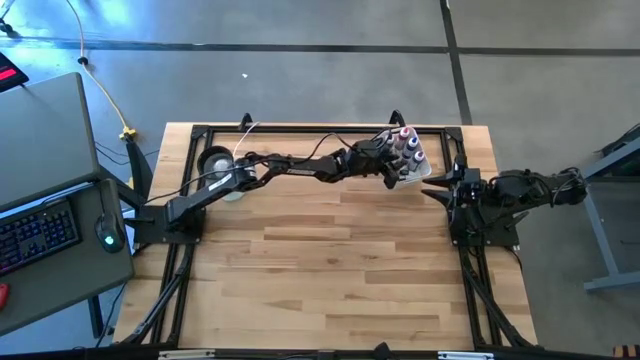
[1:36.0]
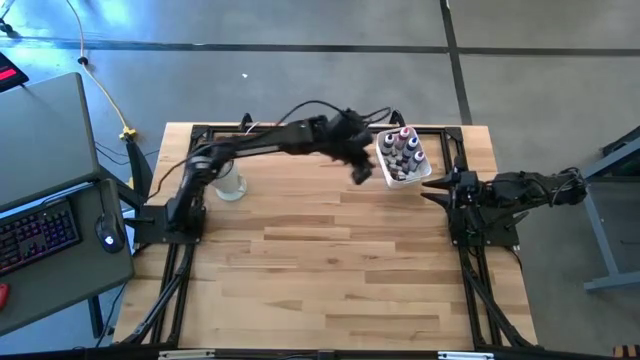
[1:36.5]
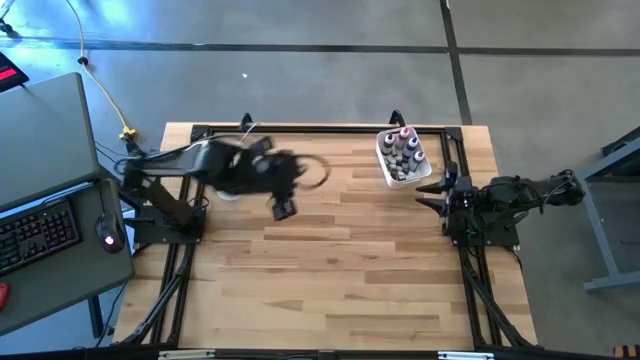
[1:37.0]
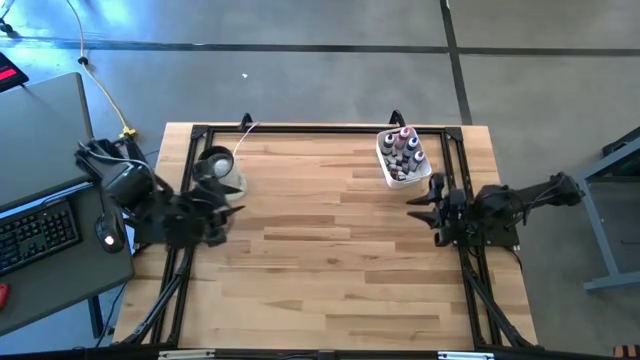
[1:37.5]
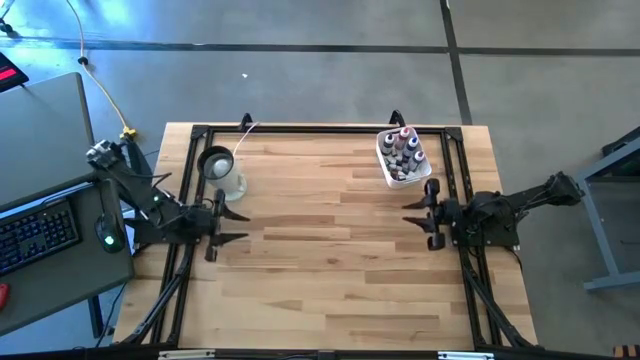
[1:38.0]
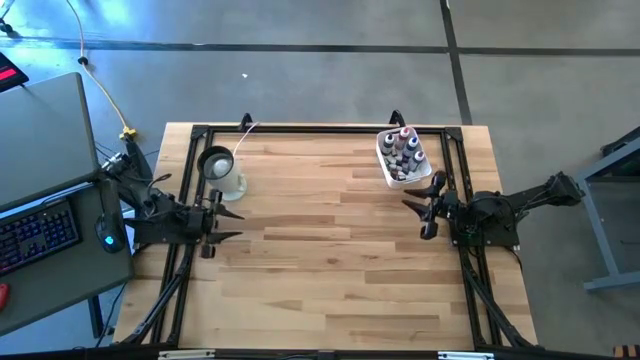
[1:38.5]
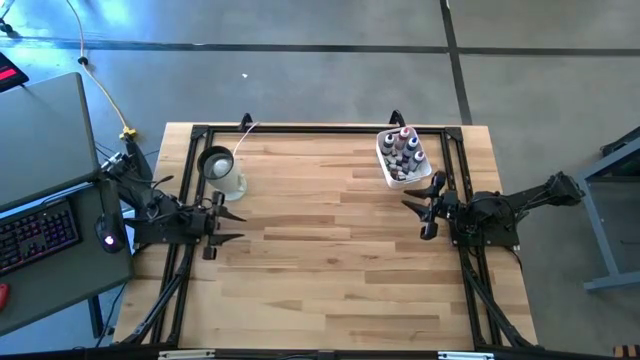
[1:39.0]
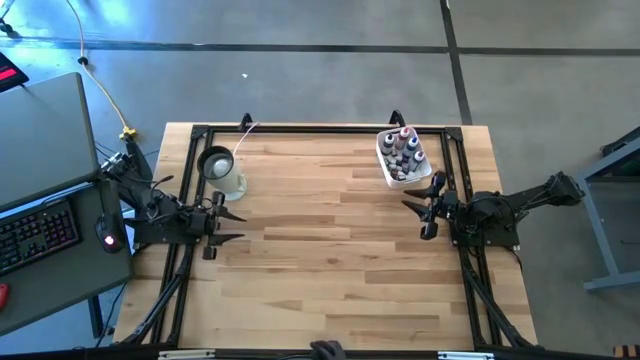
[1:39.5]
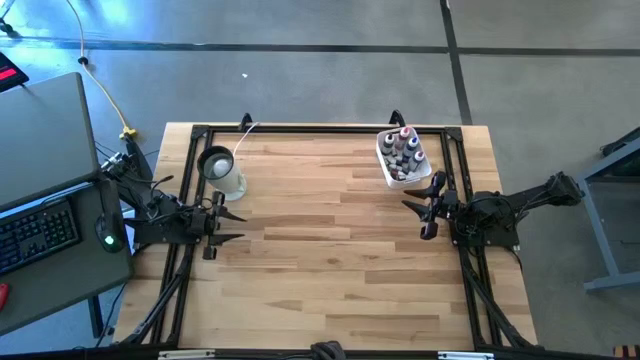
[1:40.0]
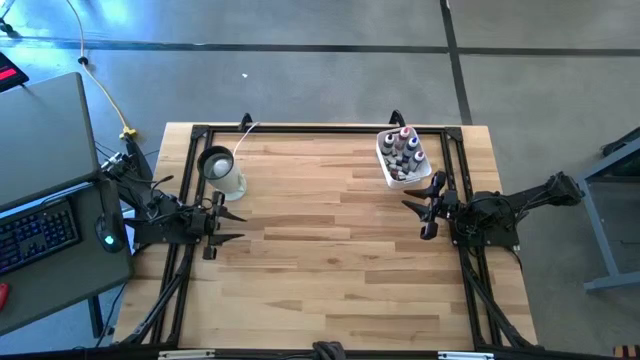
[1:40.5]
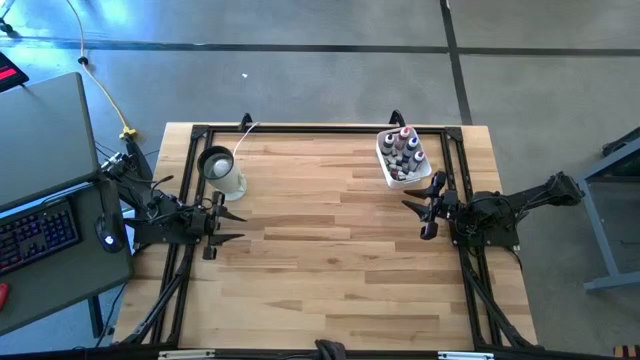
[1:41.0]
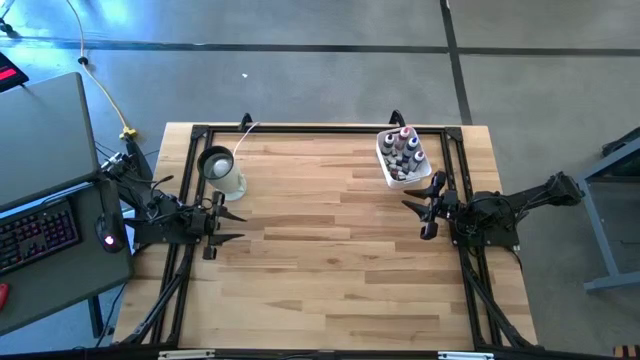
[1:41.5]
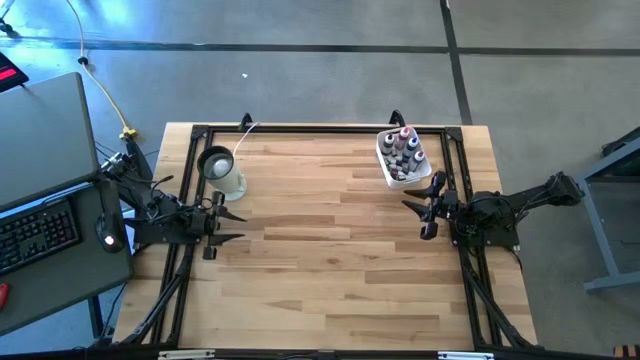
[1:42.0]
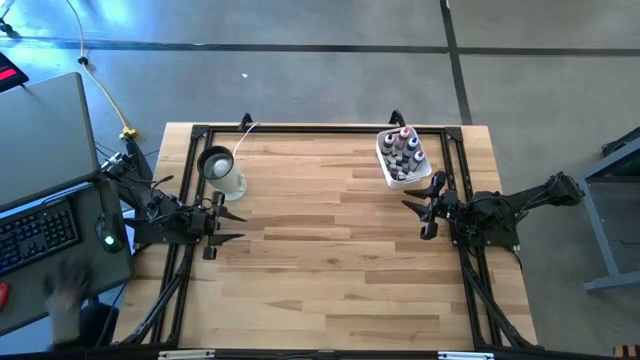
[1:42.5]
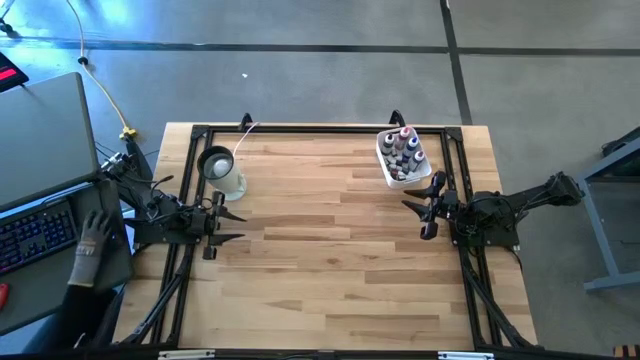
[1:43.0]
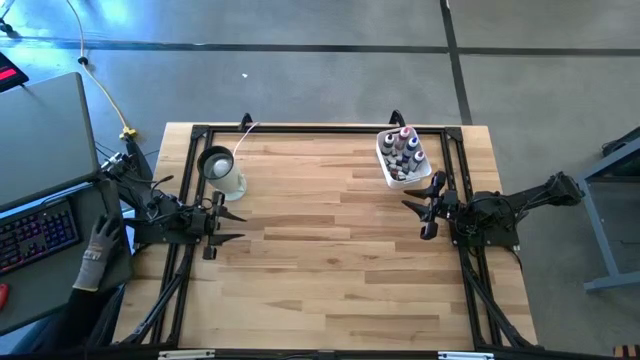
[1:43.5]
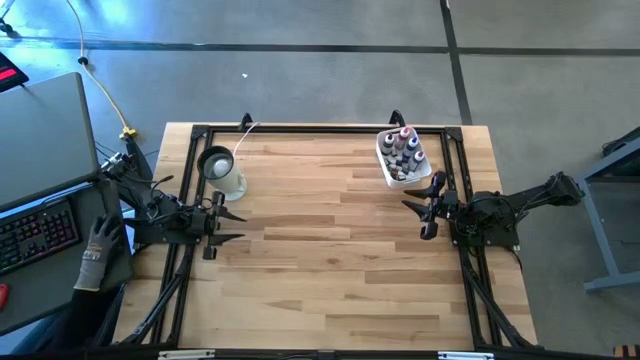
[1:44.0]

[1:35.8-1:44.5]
Task: Pick & Place food coloring
Return to Home Position

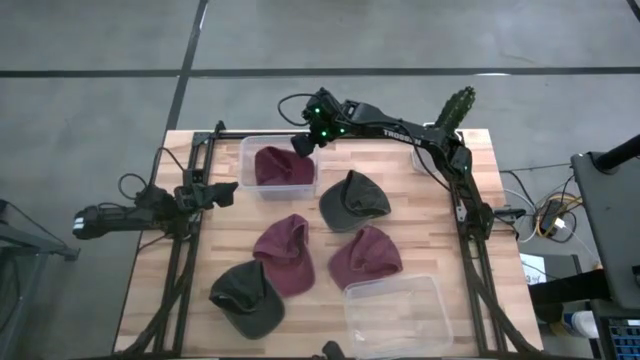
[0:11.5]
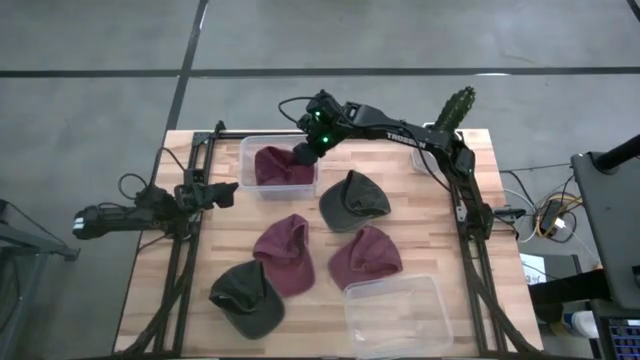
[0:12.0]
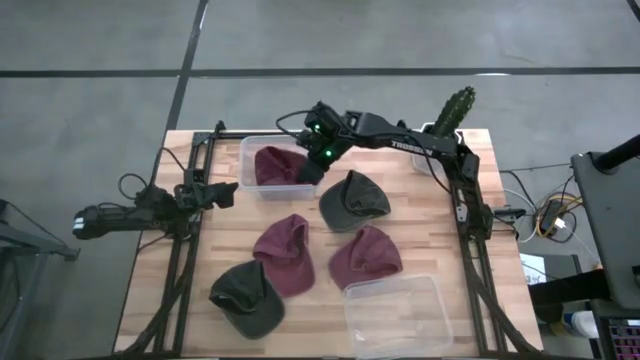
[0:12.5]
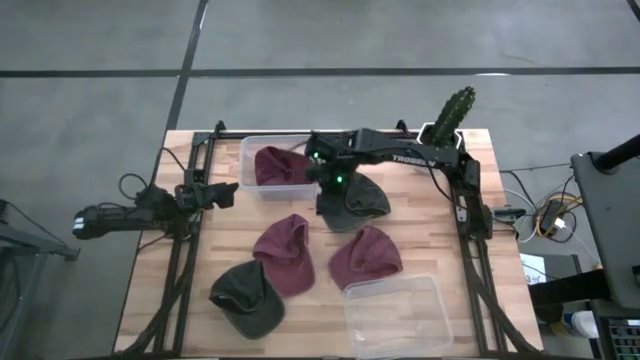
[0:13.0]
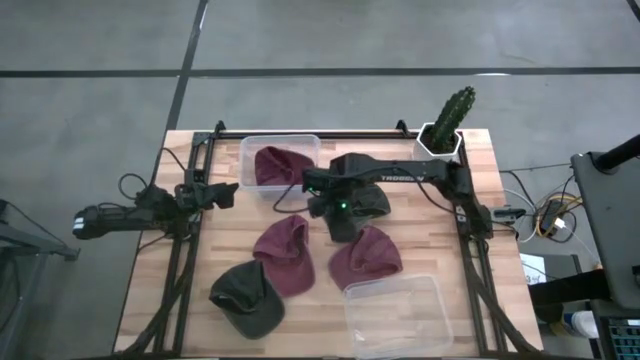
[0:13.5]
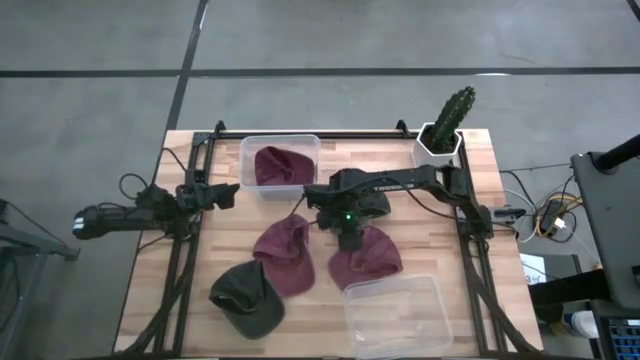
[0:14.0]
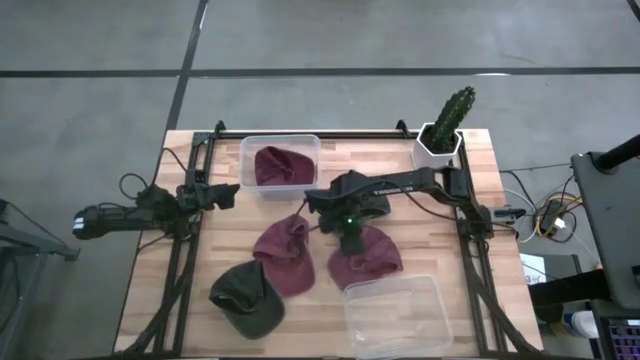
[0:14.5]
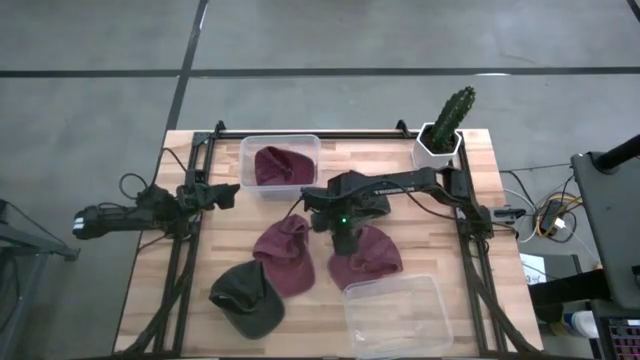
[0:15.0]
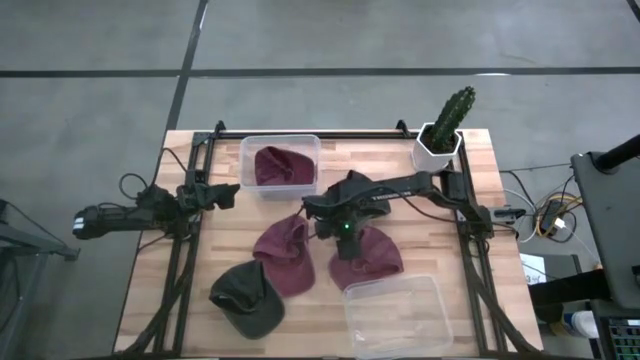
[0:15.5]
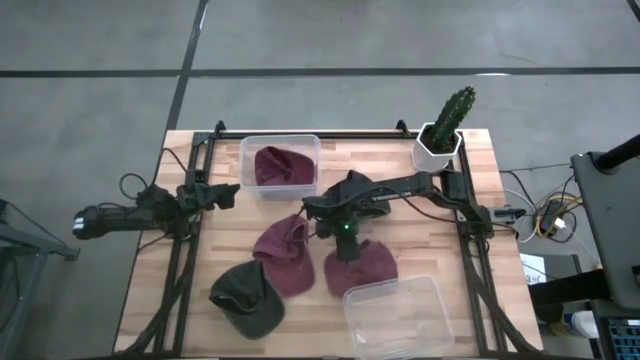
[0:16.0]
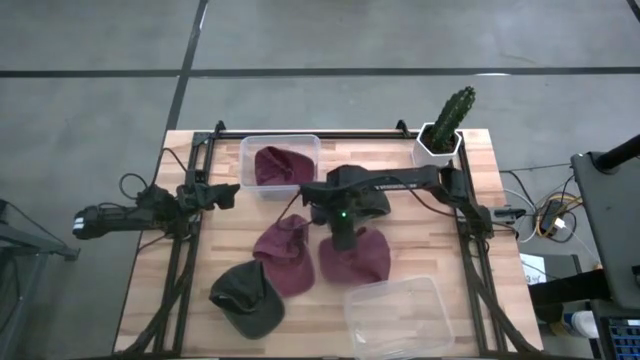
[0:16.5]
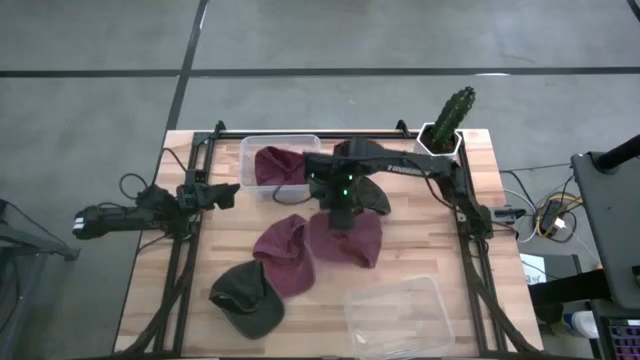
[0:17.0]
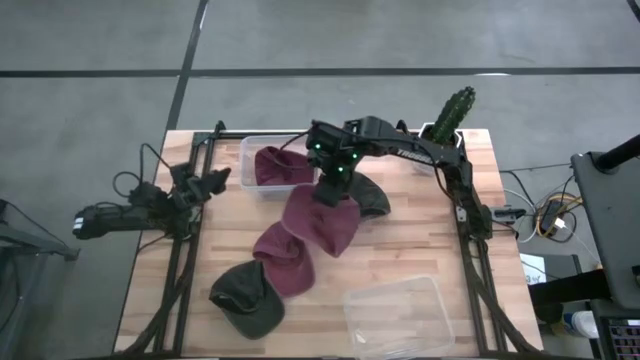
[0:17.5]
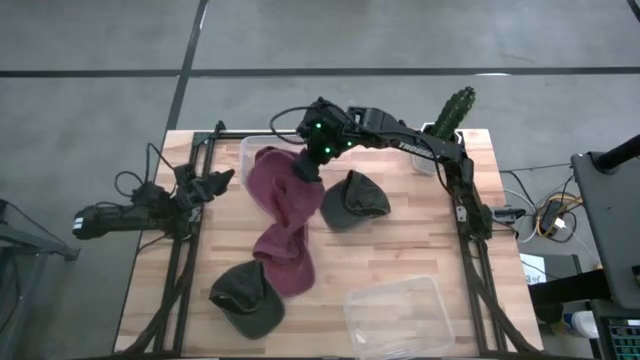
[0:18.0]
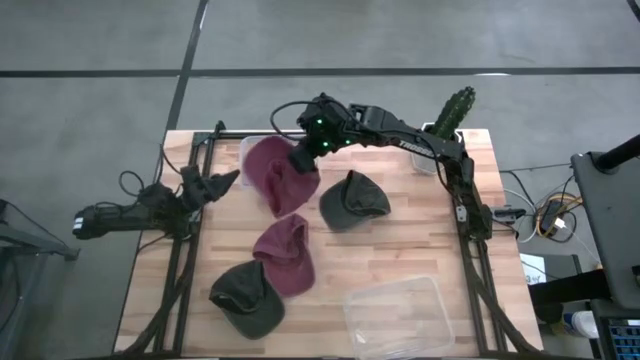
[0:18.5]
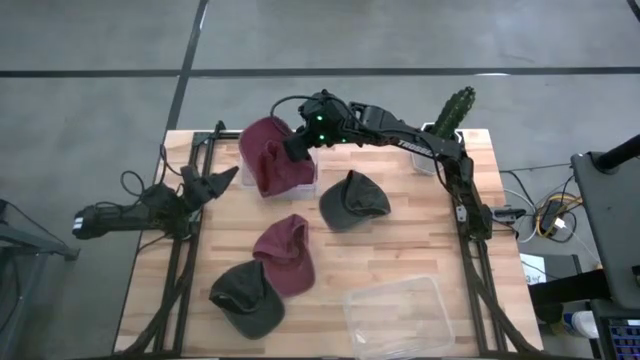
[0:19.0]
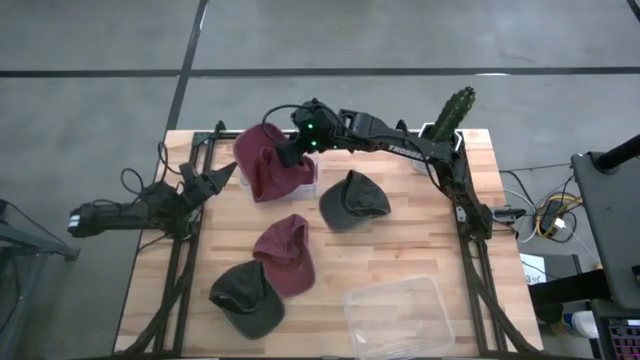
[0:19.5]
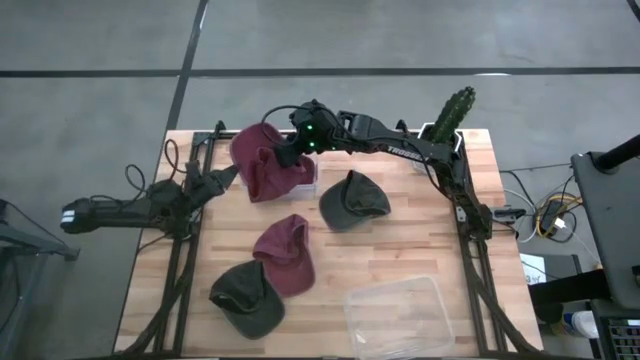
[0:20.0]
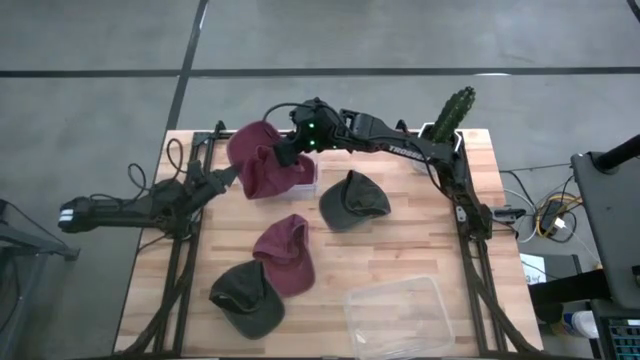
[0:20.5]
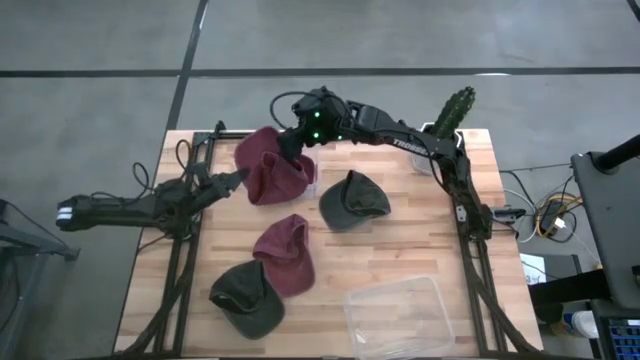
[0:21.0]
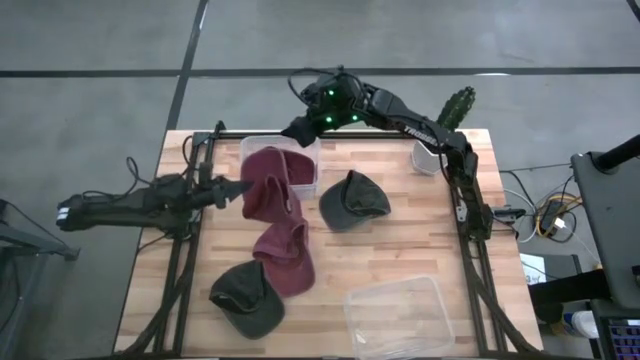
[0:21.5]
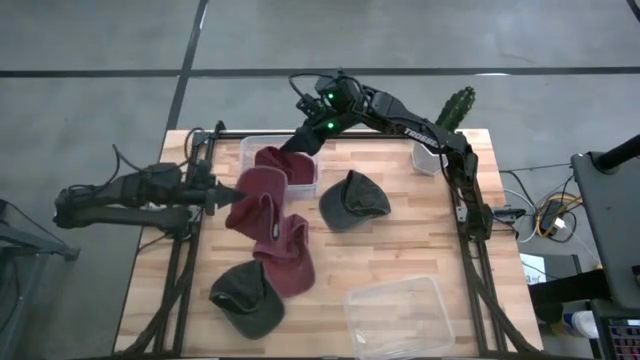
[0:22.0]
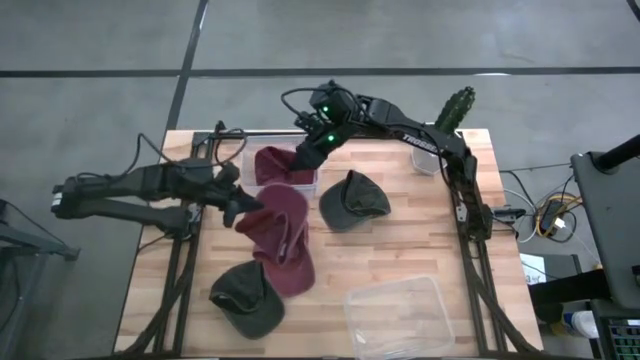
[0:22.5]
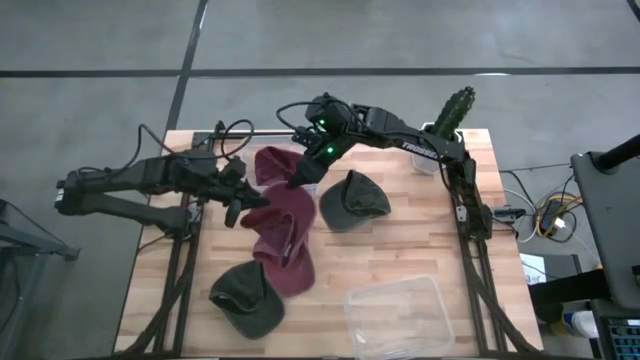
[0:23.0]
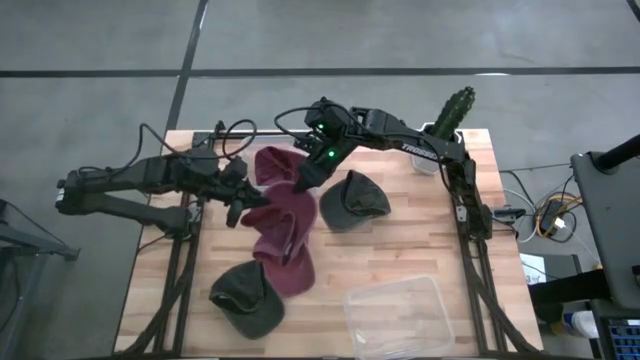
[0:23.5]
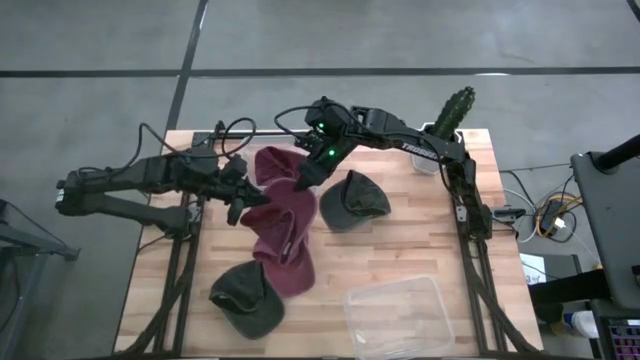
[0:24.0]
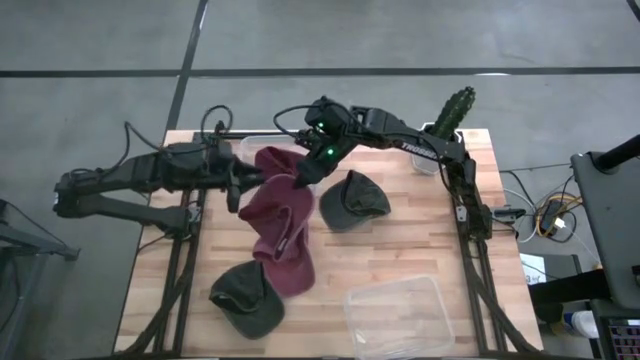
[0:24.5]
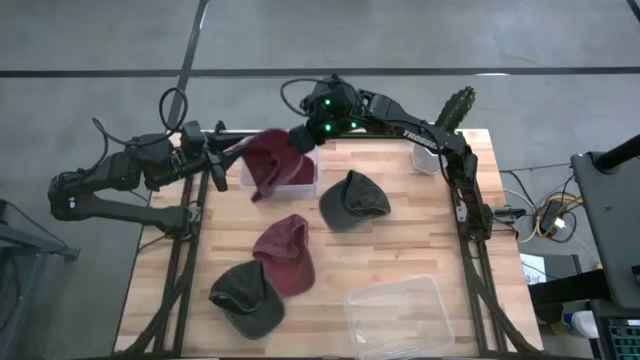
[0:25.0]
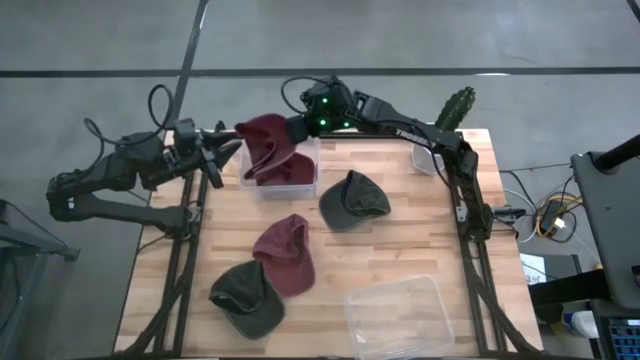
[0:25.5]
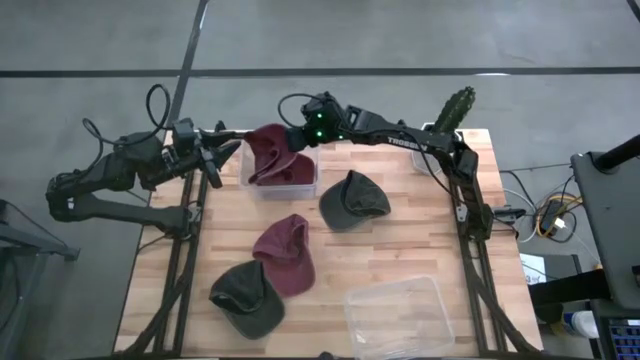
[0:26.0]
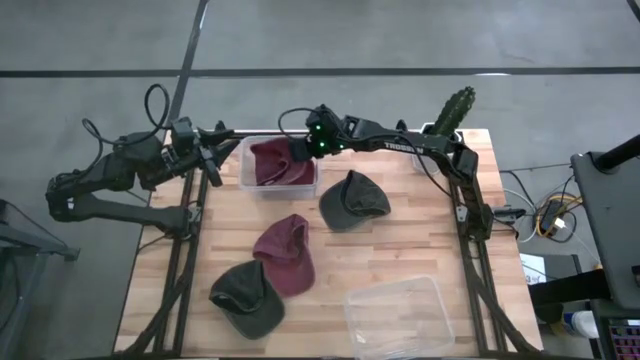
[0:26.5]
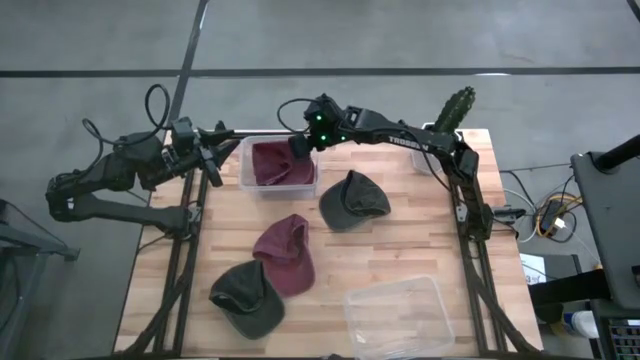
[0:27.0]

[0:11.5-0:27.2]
Task: Pick and place caps into container
Put the right red cap into the top transparent container
